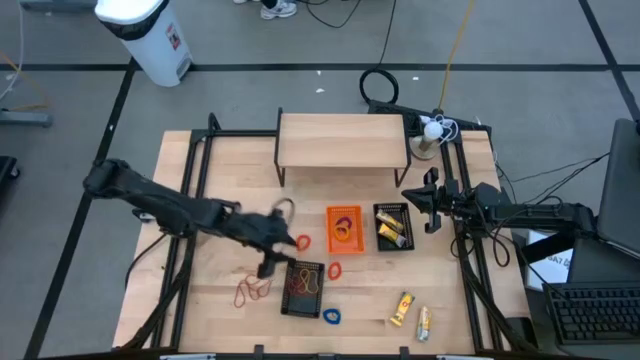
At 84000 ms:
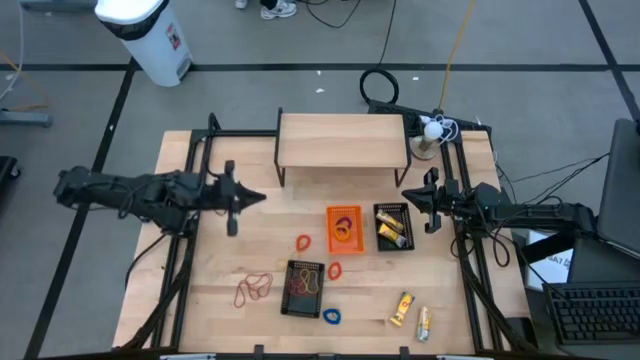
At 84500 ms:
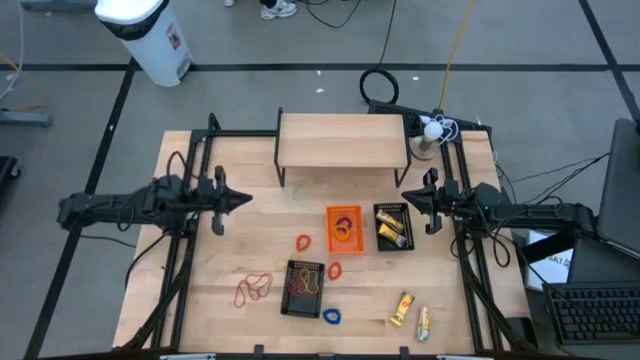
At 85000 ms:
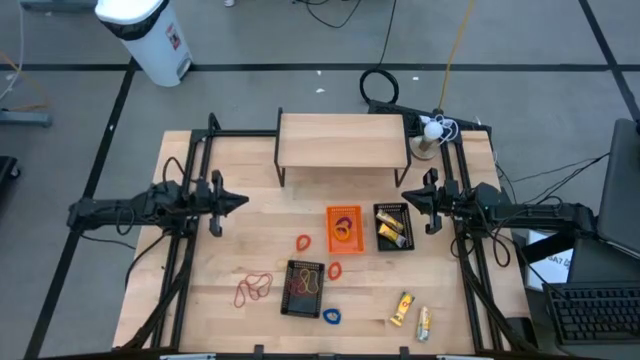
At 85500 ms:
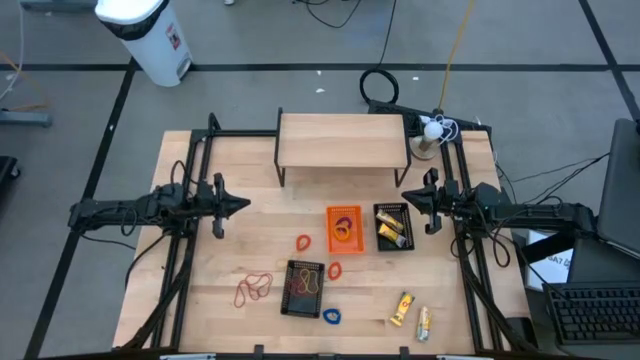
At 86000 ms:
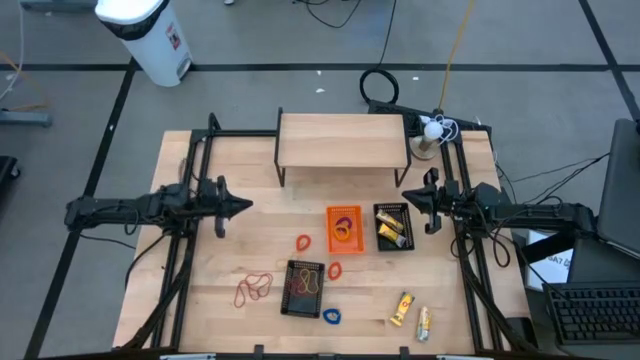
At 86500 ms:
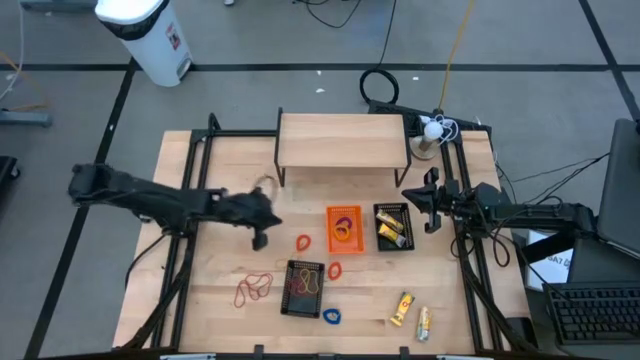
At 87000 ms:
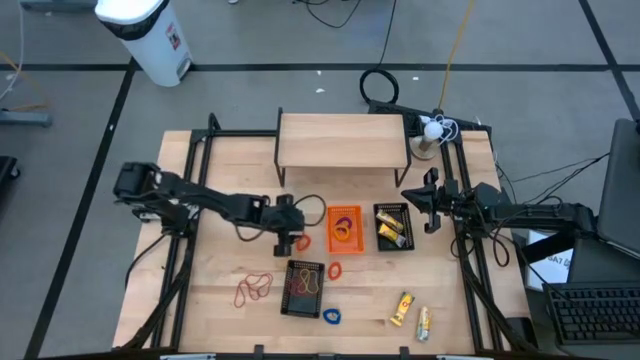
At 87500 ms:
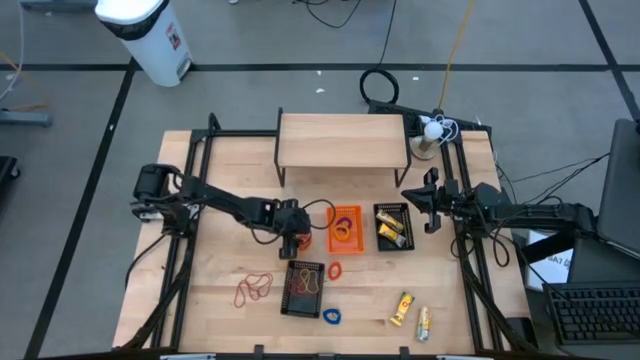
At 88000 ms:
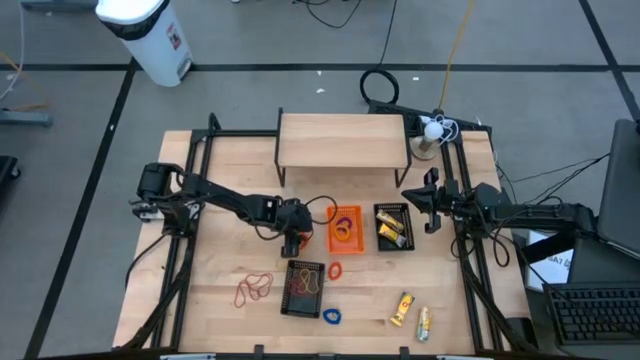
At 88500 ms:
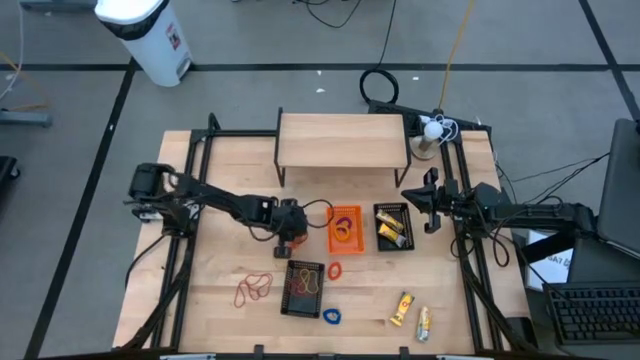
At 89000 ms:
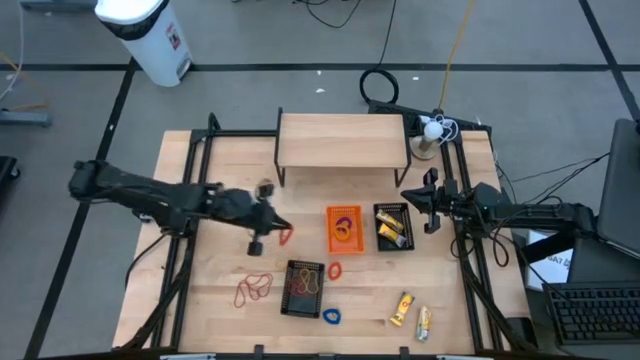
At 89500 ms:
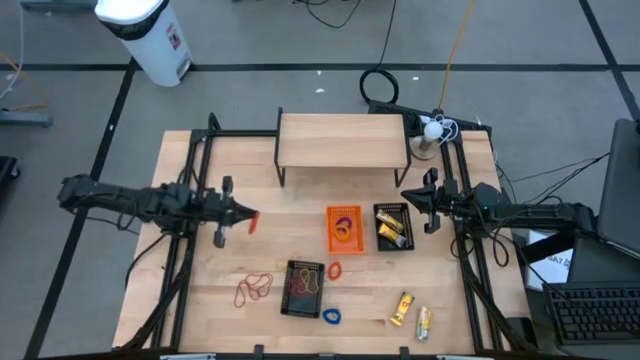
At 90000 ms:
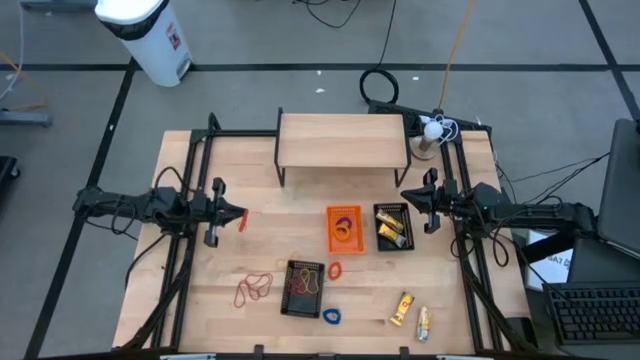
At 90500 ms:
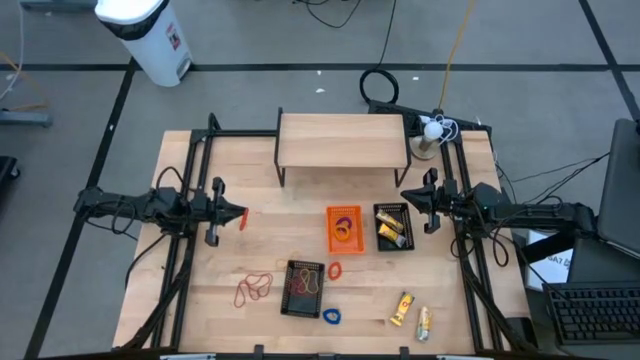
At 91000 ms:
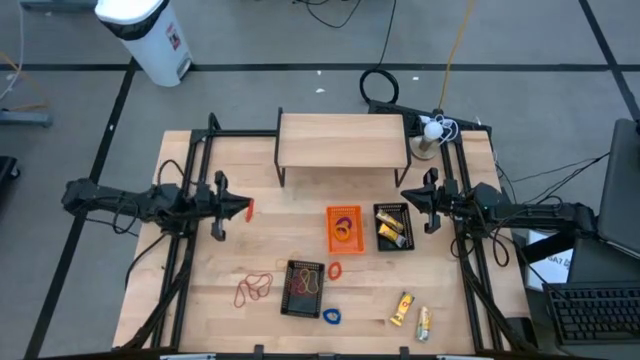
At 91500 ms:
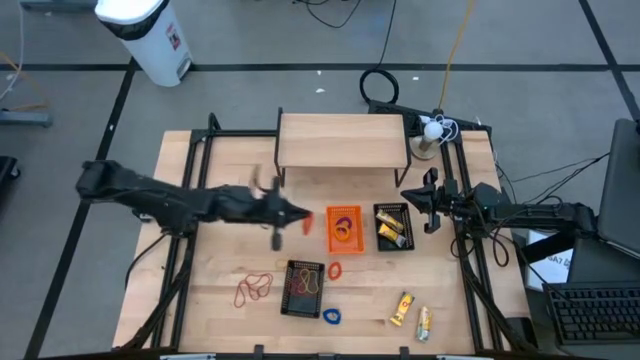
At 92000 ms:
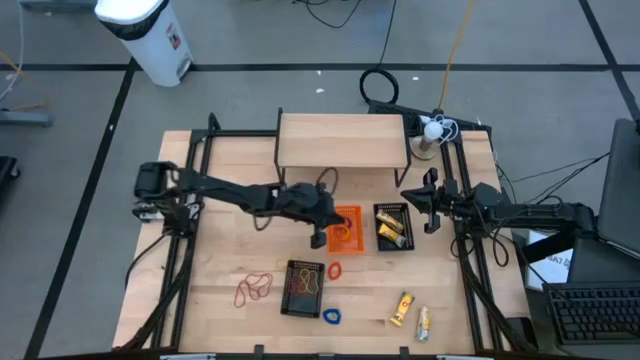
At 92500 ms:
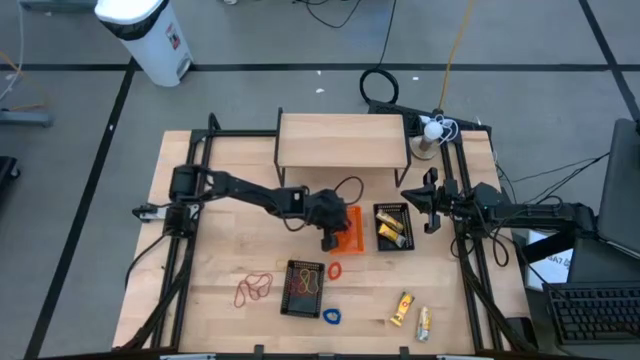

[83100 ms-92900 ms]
Task: Pick & Place Office Desk Supplies
Put the orange spring keychain into the orange bin

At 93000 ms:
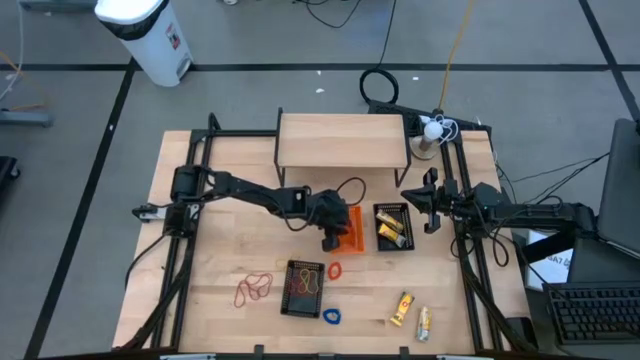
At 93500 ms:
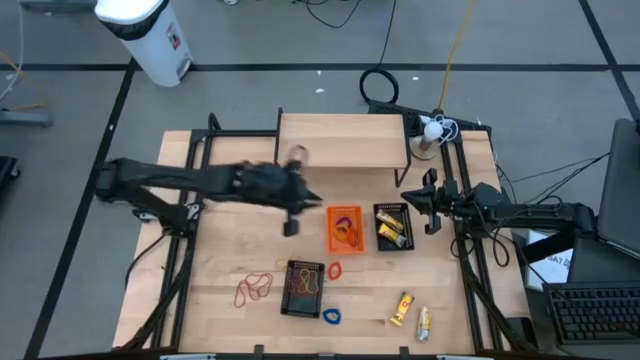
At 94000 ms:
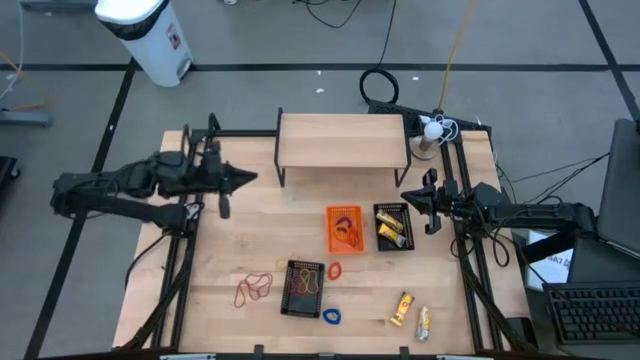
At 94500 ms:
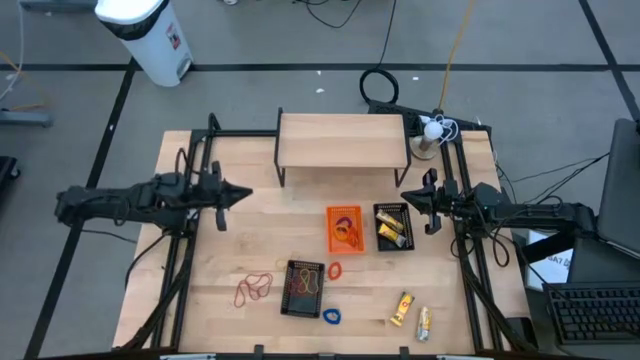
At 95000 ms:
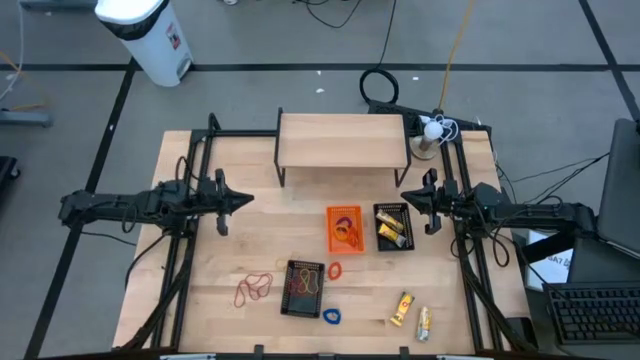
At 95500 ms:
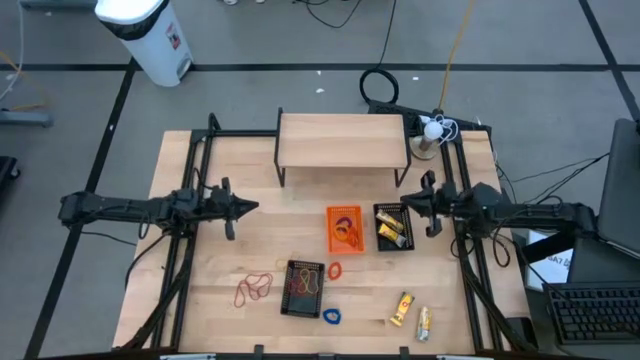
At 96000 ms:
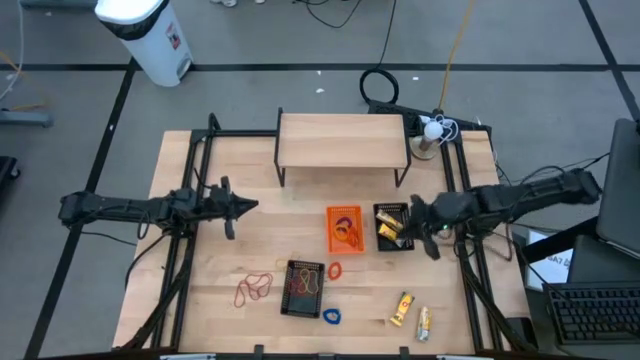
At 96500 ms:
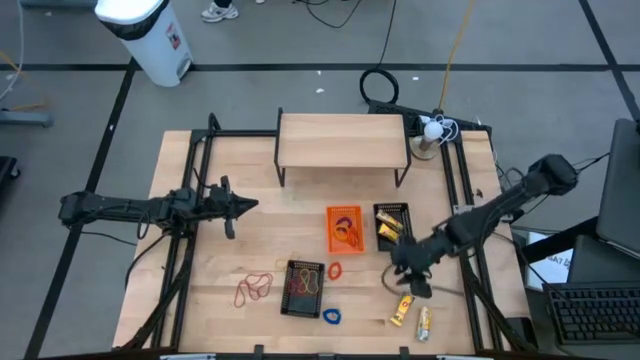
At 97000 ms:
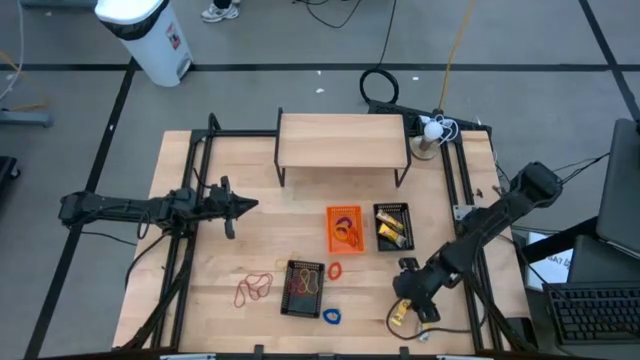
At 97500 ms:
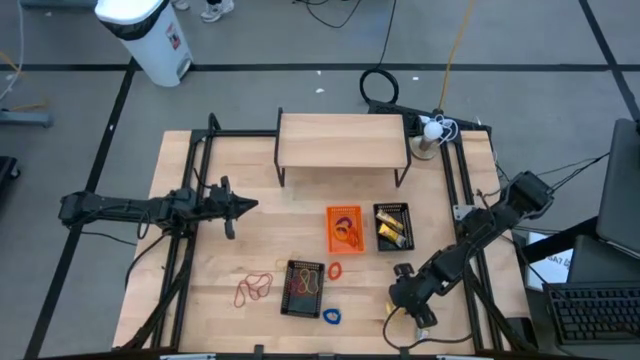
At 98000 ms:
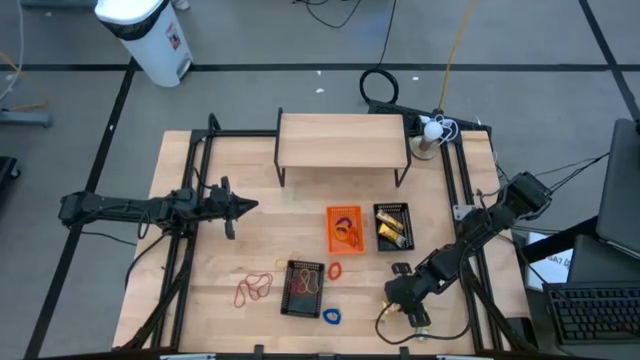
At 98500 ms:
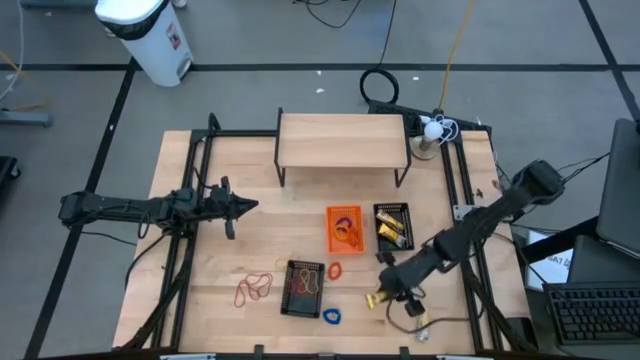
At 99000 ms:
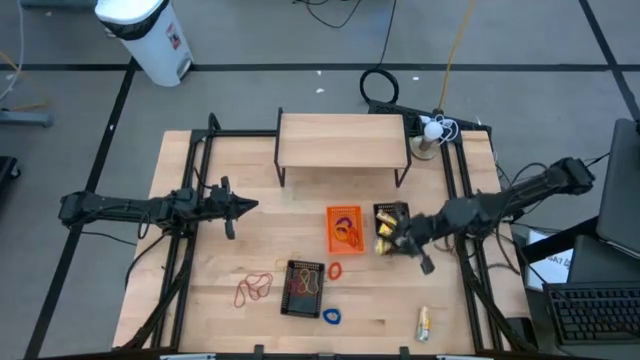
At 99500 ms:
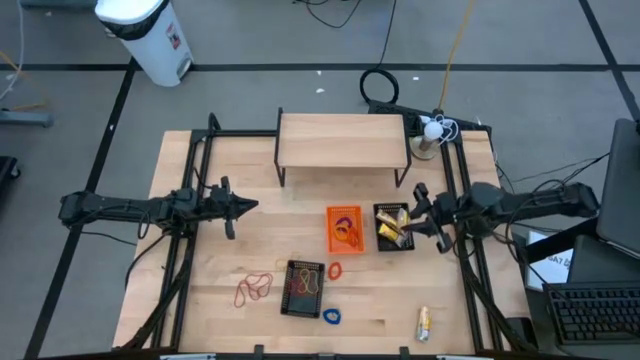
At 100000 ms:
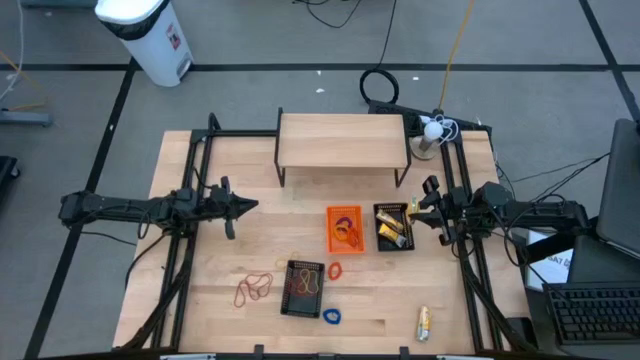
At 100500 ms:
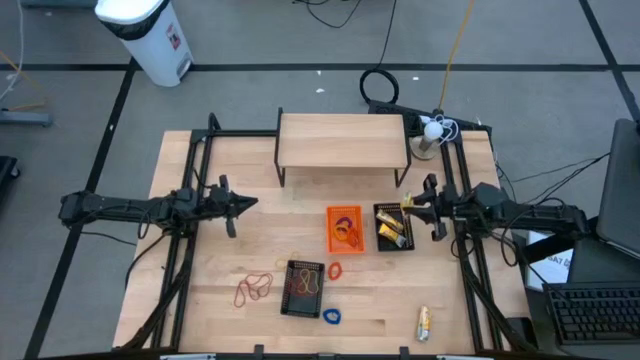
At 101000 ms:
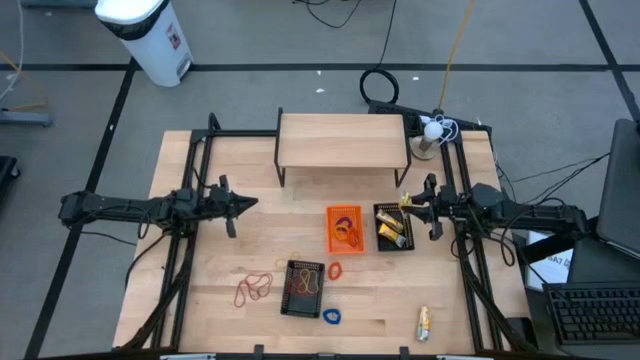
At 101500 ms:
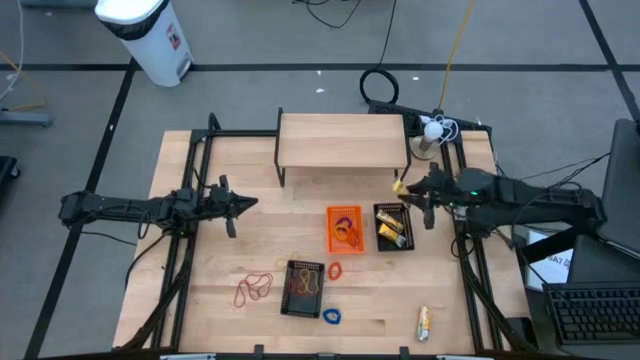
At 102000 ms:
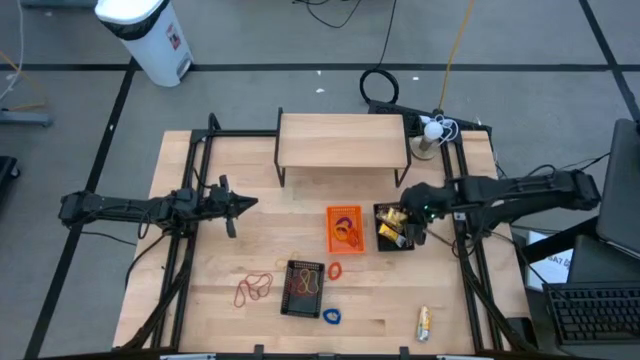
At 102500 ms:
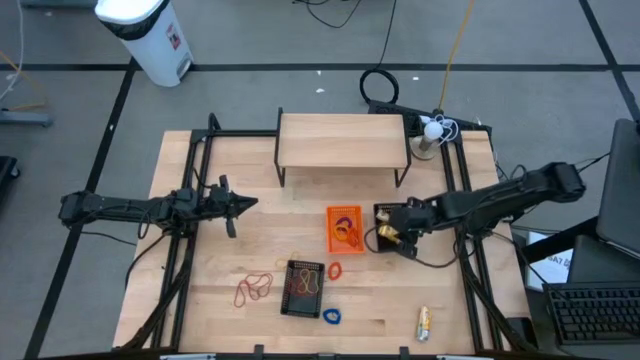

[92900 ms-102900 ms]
Put the yellow crayon box into the top black bin
